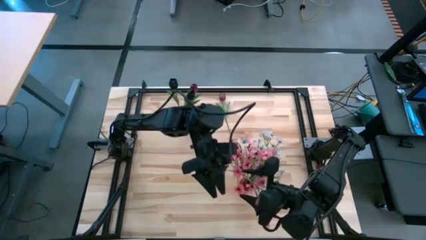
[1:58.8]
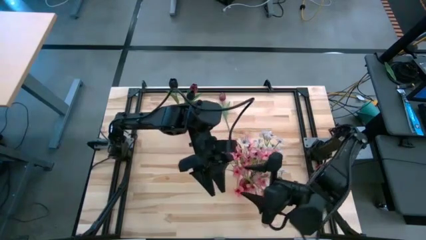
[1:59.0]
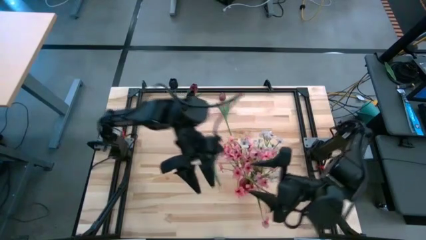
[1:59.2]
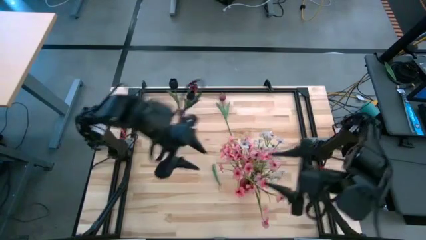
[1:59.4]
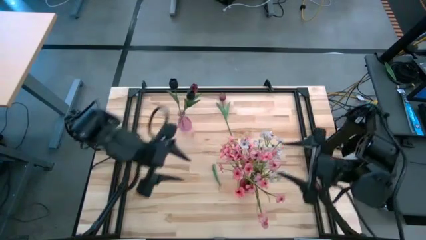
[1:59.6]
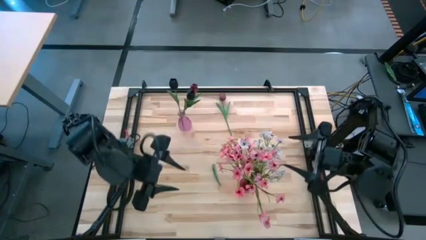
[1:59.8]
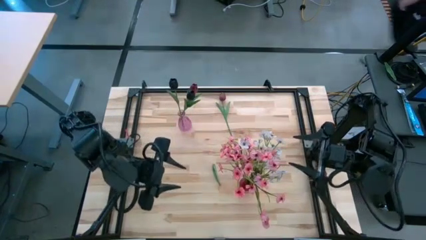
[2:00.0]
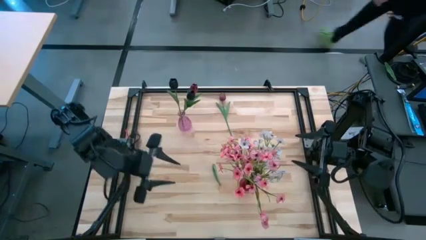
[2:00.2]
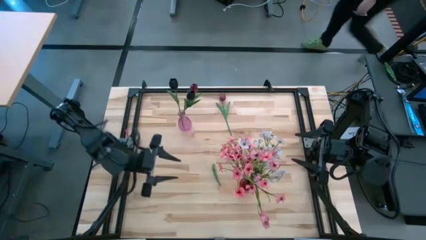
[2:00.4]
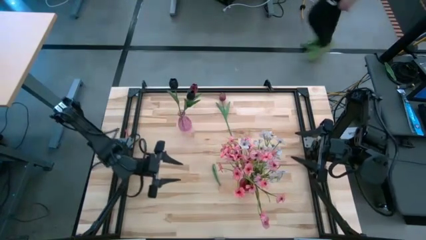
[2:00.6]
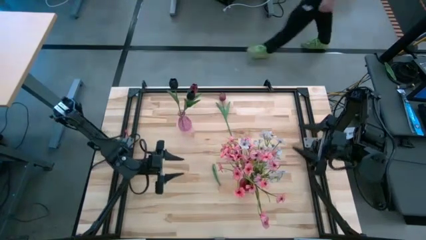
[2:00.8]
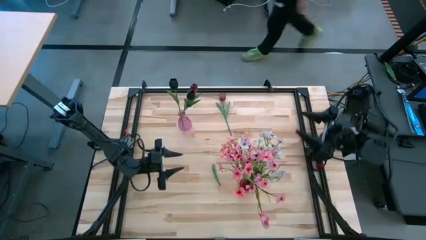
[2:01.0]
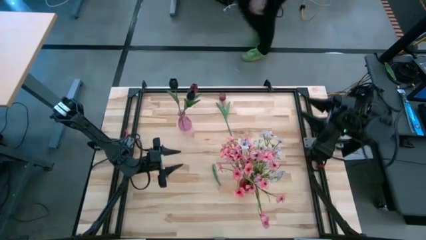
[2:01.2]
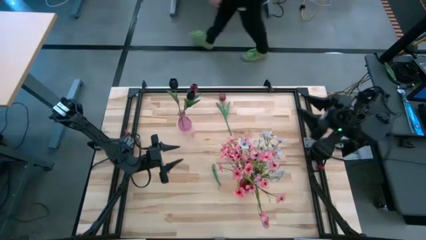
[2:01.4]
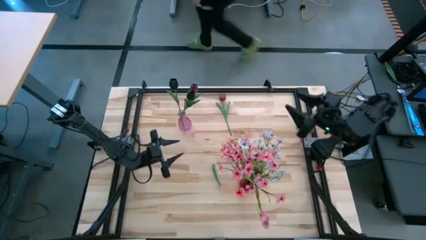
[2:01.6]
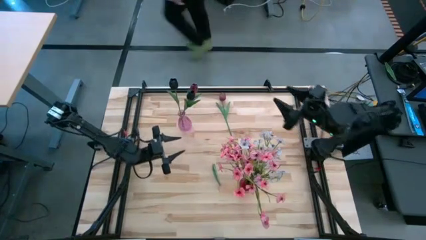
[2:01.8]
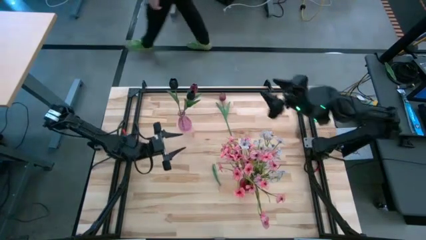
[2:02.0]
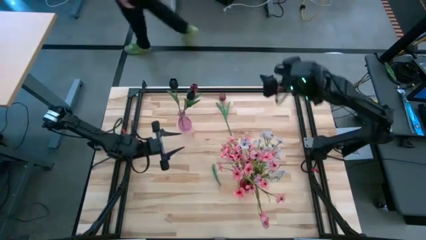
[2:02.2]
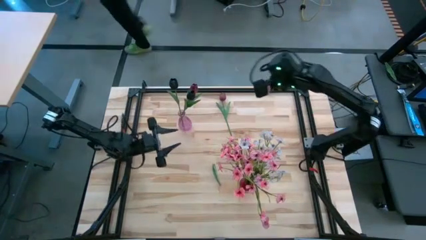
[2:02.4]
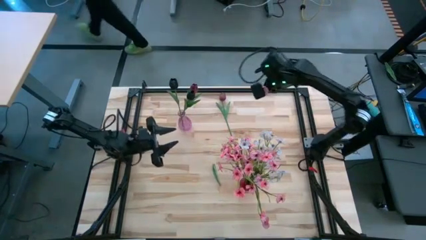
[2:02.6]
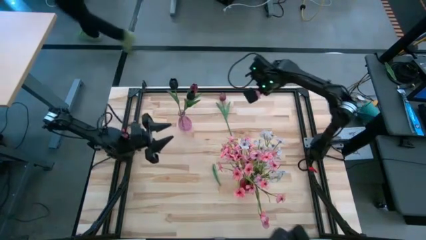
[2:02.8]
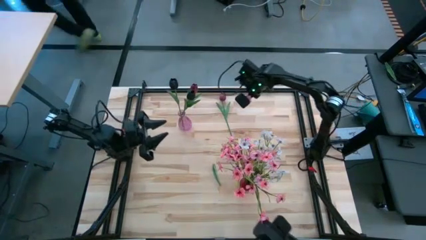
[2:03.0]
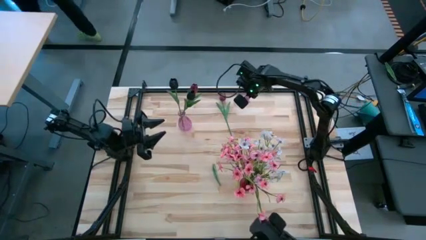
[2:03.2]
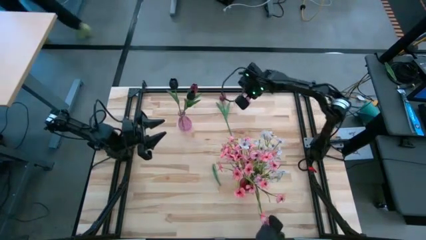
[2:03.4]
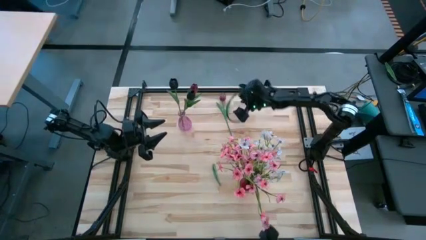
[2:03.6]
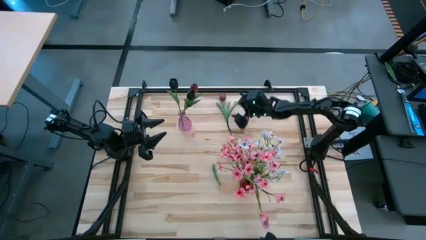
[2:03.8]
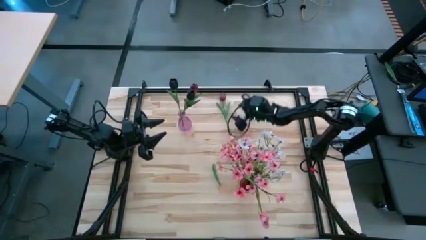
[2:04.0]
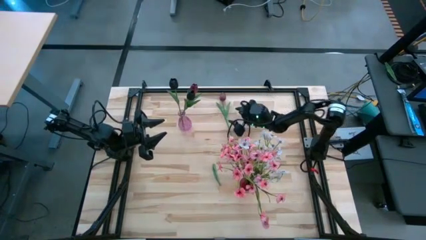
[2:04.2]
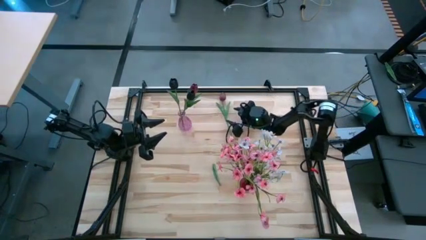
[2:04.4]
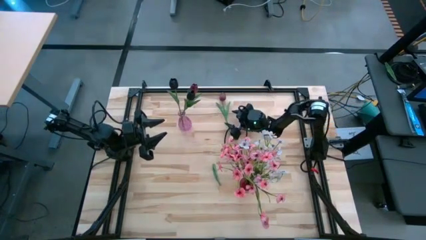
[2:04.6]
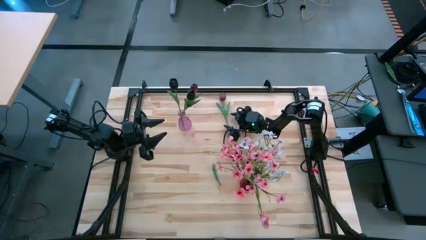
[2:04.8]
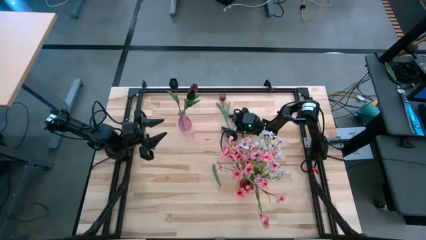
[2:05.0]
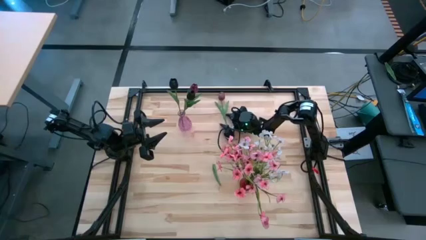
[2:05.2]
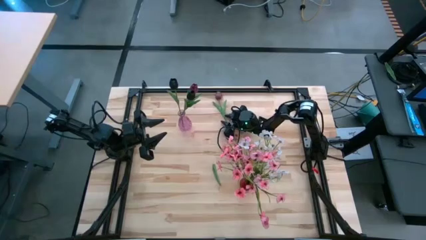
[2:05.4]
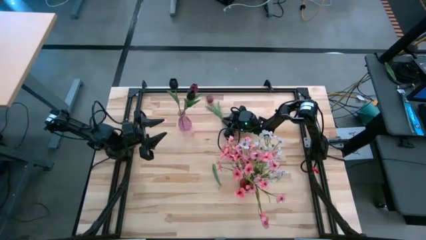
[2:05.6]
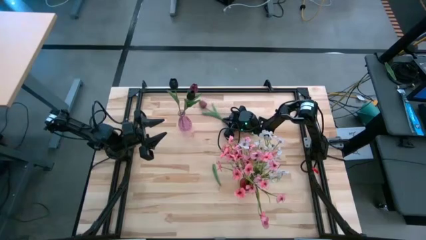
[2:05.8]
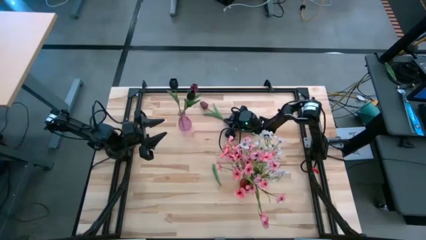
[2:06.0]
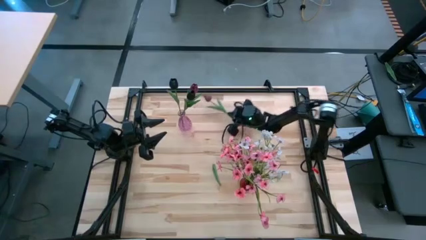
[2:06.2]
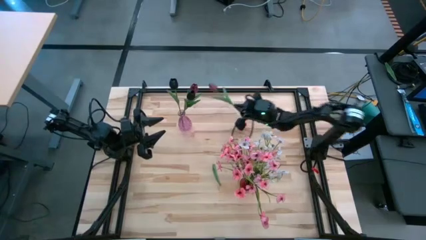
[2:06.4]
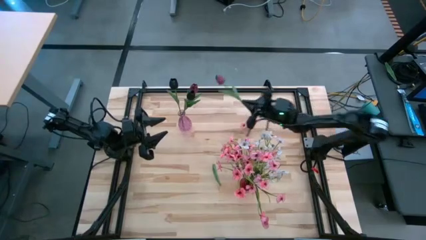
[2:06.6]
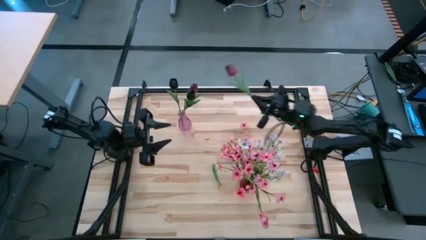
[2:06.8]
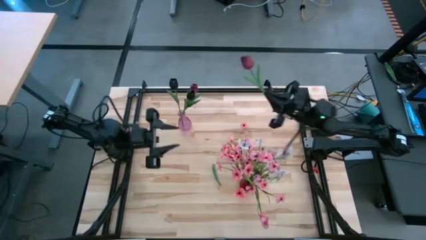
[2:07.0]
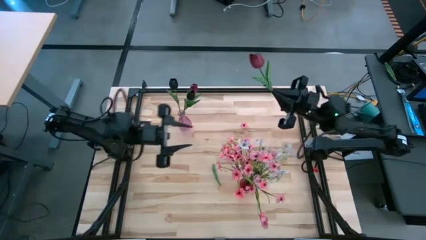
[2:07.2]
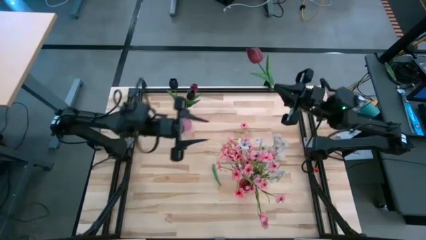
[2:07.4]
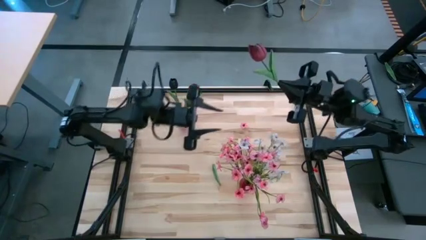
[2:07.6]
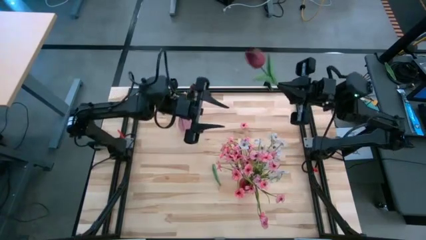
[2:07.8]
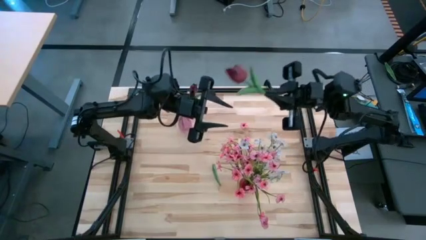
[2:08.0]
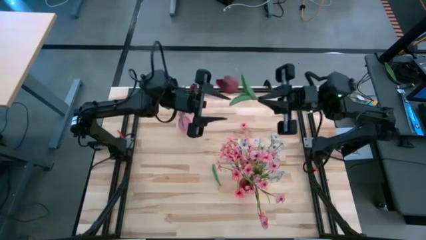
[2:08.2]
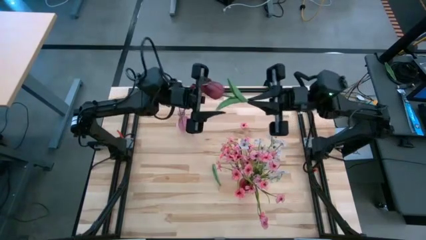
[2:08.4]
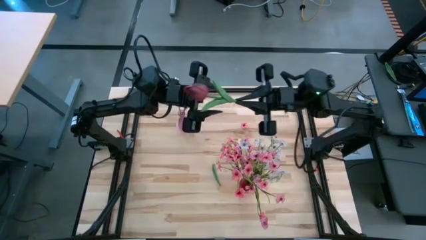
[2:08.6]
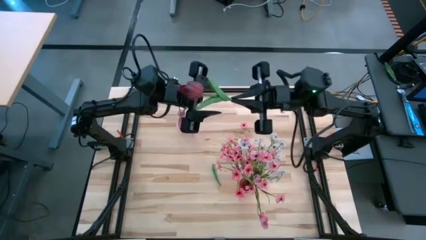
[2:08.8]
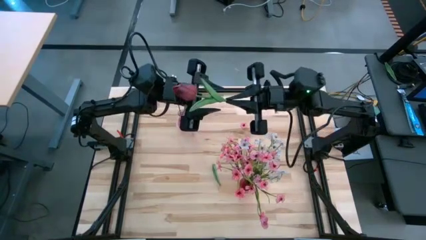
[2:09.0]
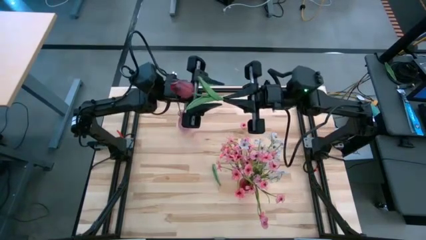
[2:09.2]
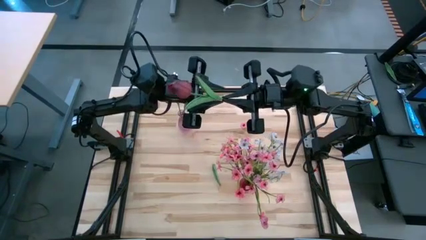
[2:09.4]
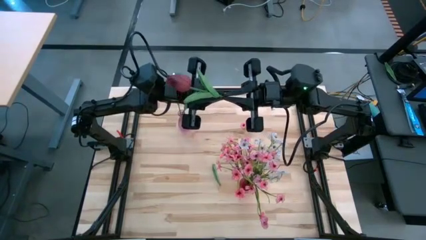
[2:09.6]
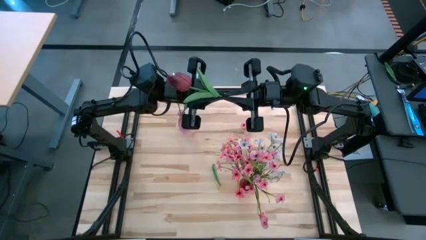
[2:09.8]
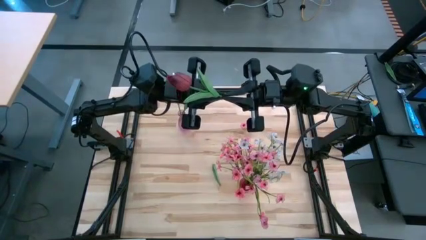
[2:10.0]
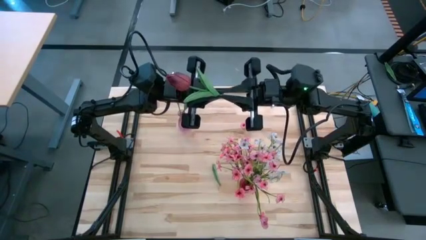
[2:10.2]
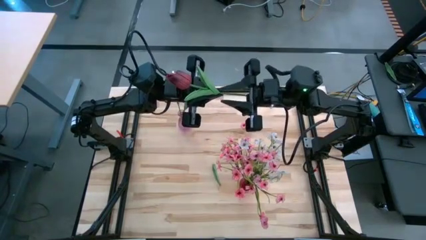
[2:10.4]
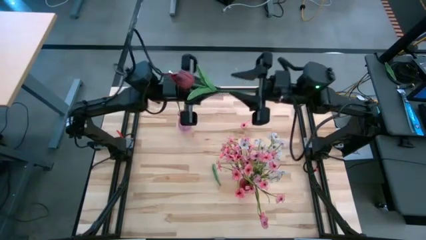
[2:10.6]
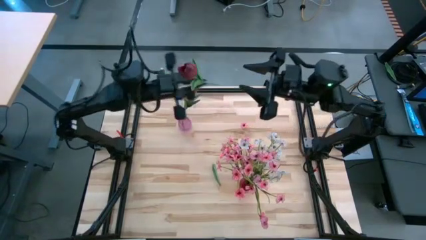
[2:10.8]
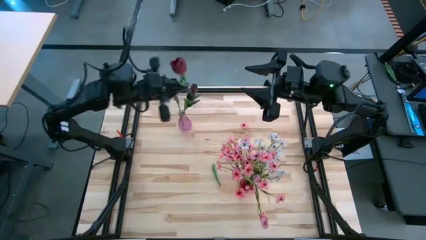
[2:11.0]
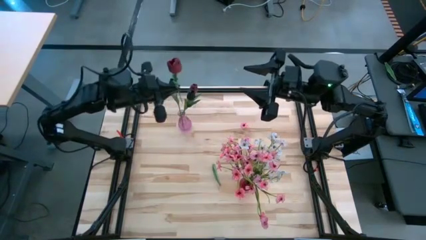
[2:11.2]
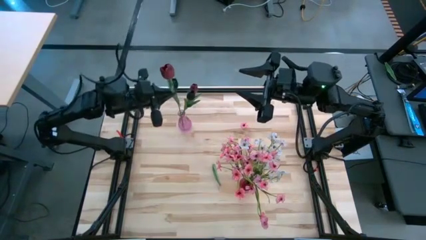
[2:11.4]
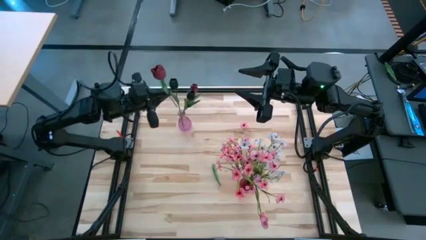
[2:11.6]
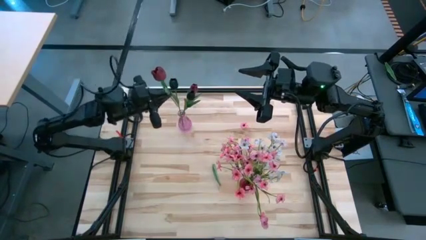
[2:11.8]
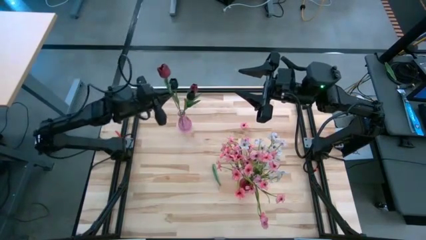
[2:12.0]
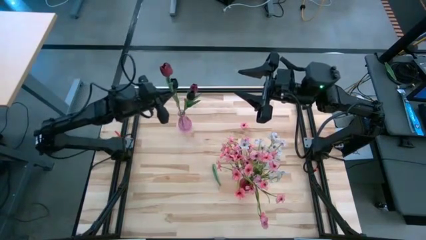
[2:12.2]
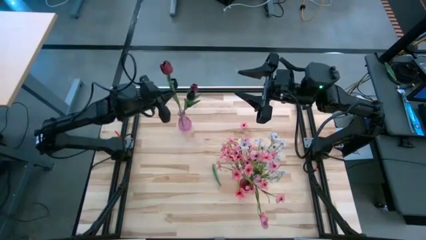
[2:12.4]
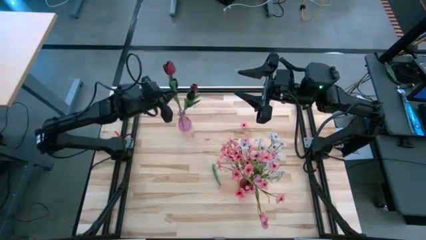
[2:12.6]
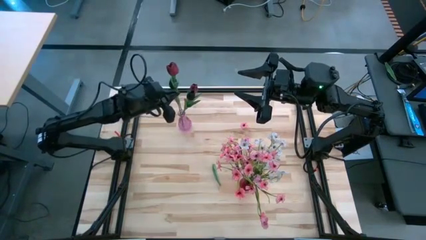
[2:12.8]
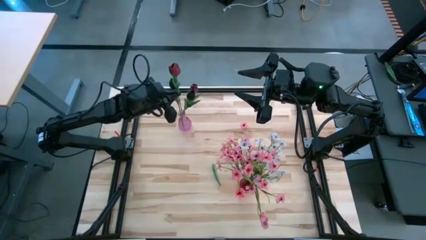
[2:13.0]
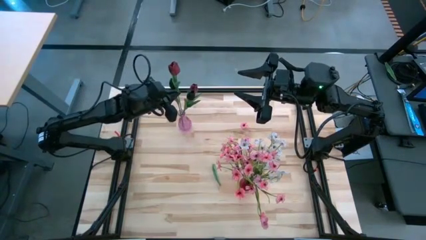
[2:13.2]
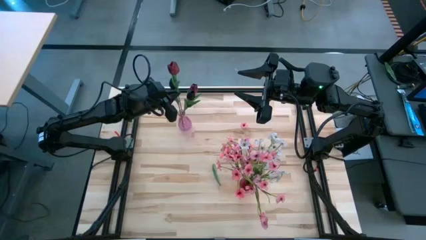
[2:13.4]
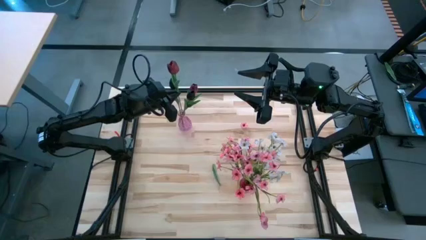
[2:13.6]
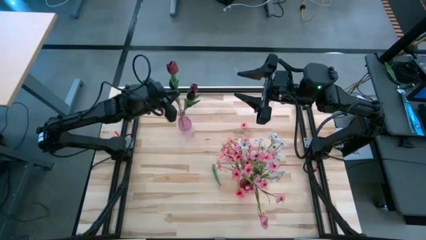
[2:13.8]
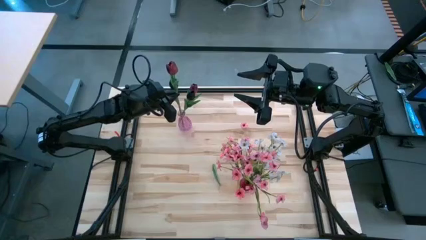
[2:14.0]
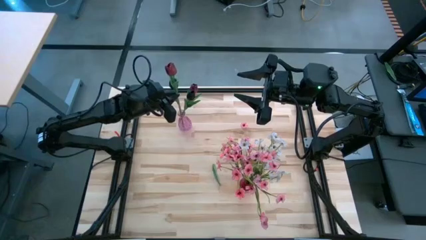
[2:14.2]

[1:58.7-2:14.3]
Task: Sort flowers into vase by color
Put the pink flower into the top left vase

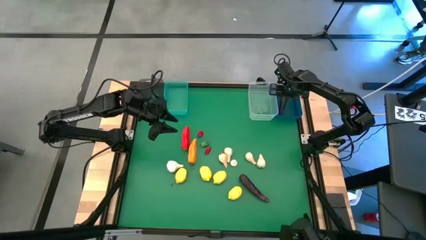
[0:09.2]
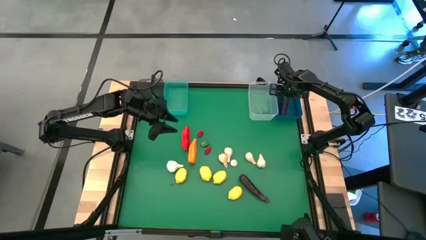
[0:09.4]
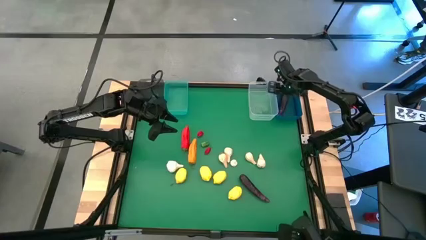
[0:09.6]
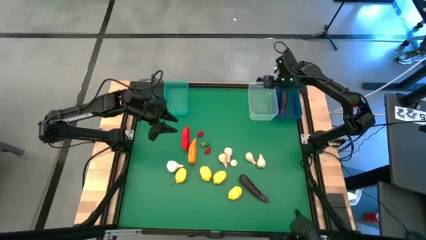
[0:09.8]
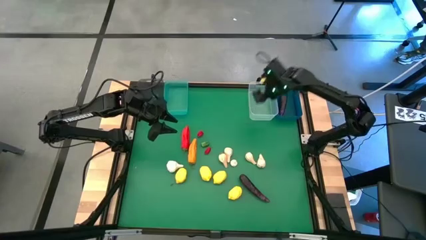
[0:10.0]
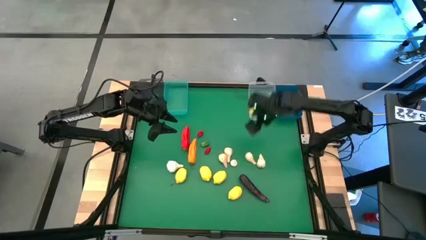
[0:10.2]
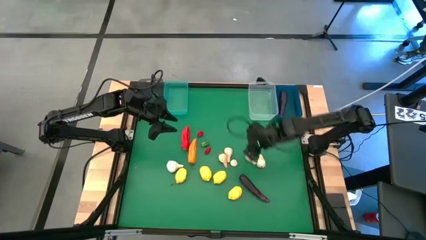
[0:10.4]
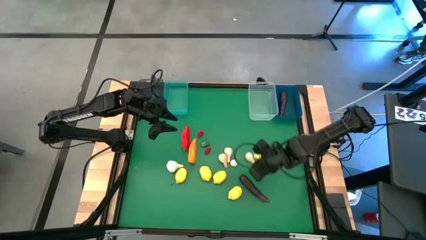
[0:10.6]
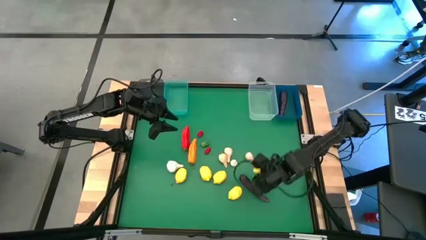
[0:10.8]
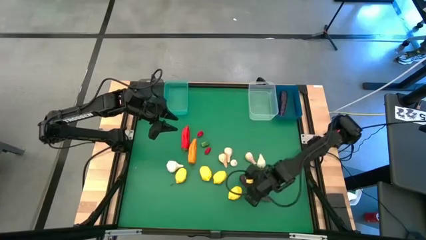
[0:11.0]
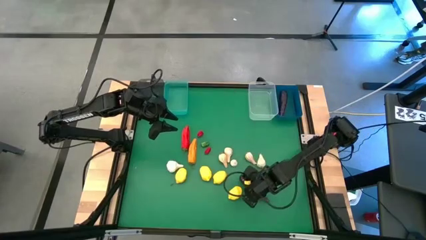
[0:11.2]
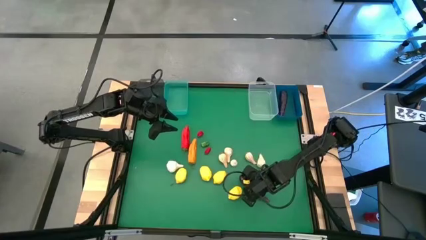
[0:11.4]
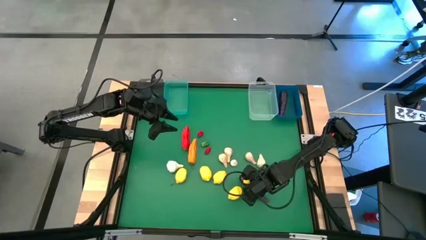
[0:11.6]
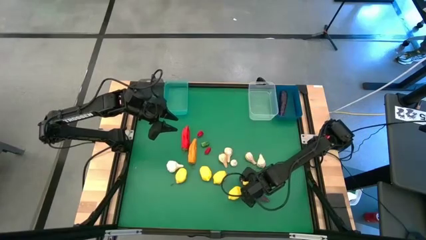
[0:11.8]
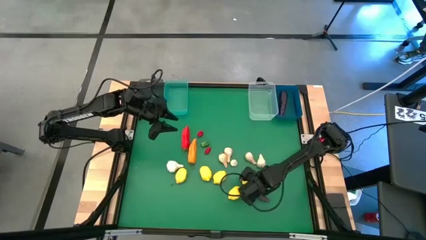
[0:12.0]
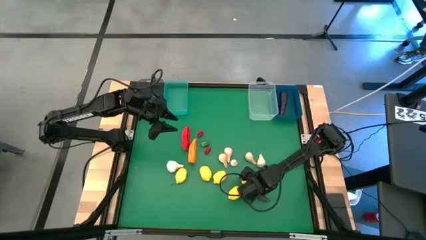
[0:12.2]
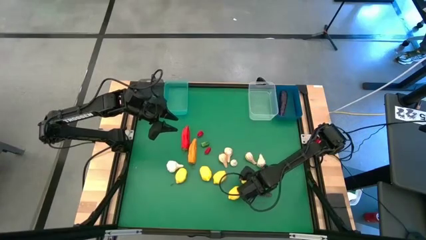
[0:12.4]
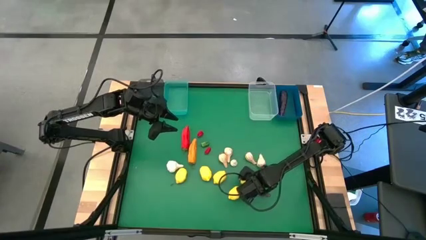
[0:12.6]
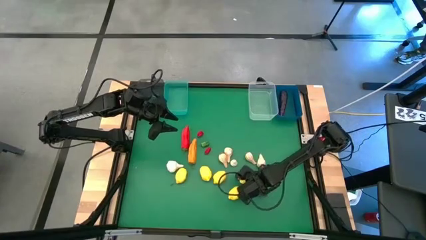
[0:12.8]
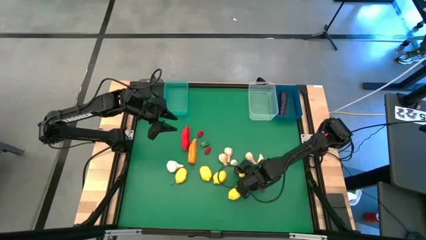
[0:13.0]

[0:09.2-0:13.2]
Task: Sort produce into baskets
Put the eggplant into the dark blue bin
